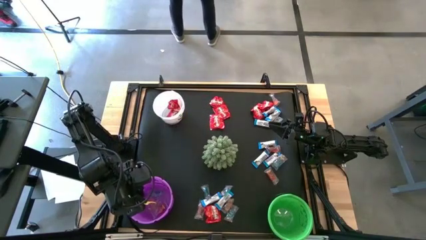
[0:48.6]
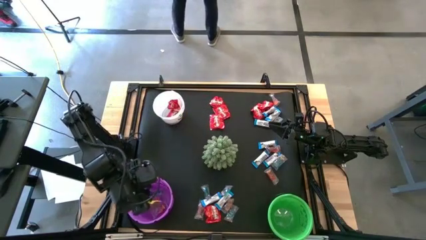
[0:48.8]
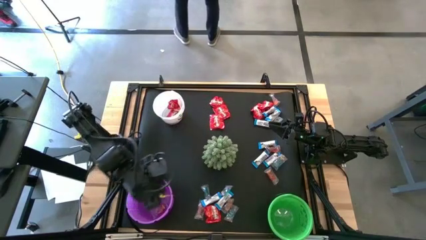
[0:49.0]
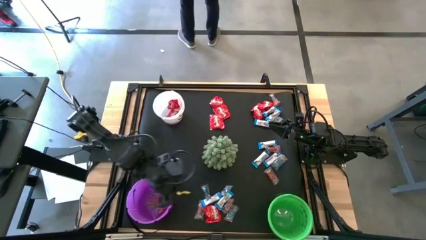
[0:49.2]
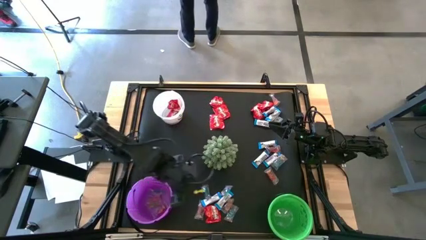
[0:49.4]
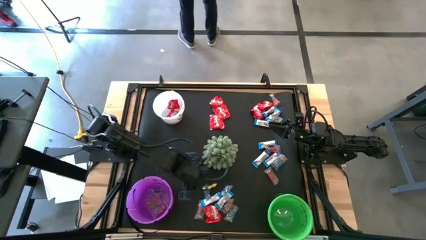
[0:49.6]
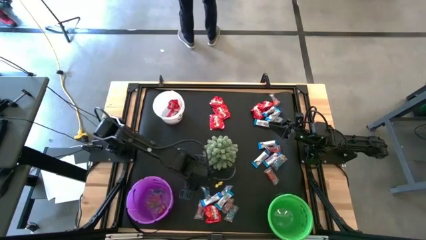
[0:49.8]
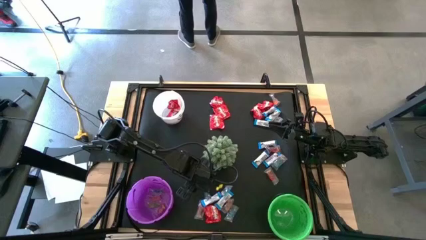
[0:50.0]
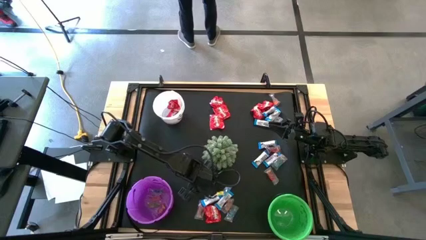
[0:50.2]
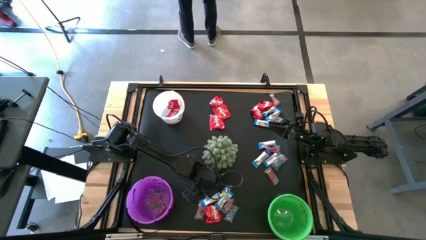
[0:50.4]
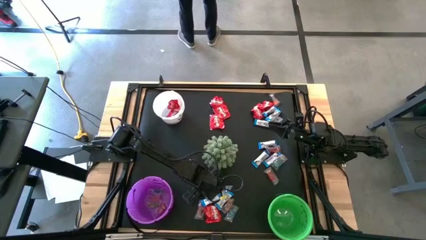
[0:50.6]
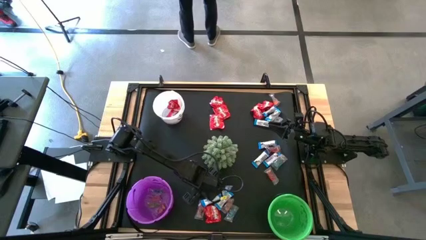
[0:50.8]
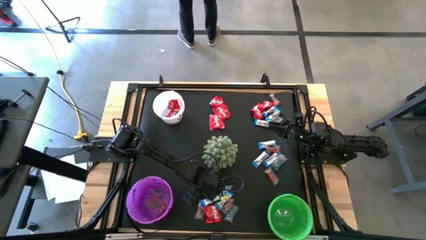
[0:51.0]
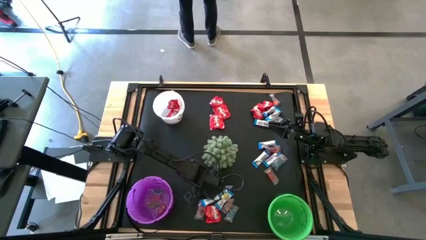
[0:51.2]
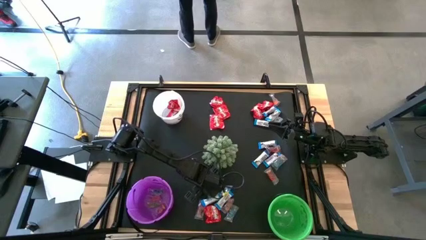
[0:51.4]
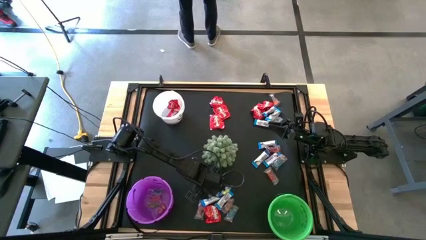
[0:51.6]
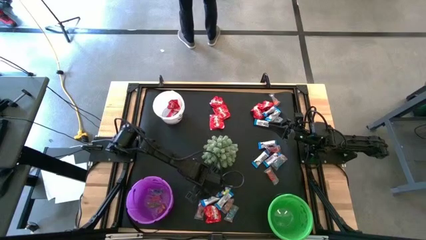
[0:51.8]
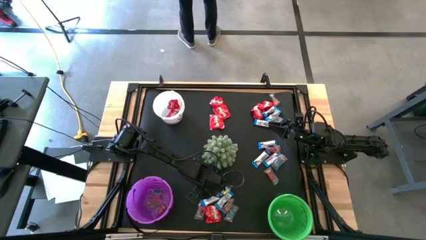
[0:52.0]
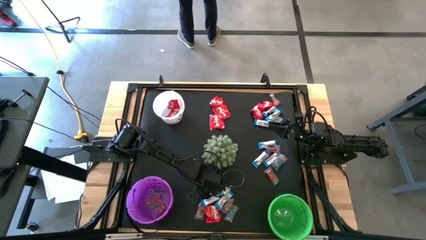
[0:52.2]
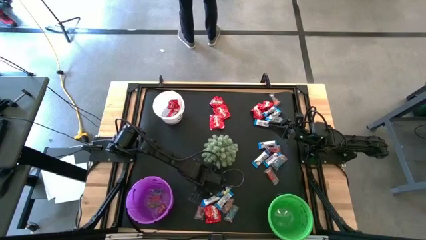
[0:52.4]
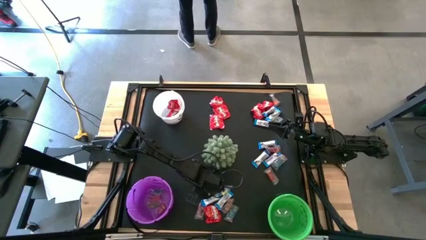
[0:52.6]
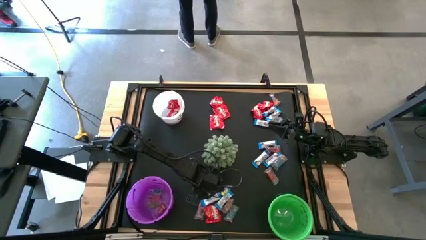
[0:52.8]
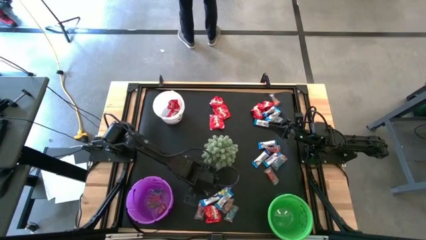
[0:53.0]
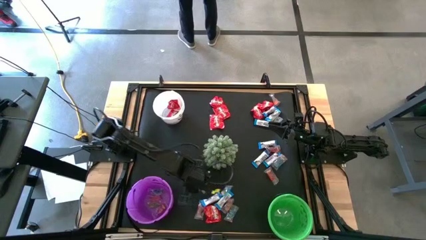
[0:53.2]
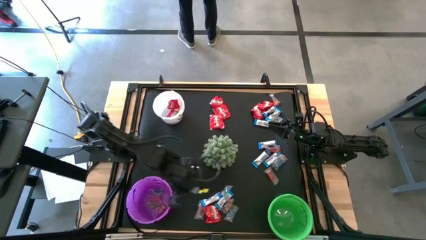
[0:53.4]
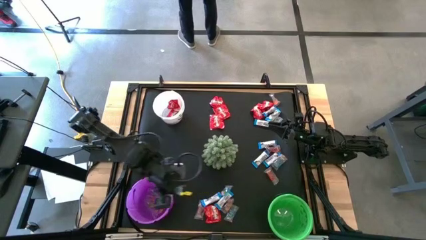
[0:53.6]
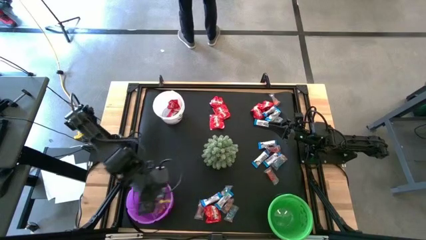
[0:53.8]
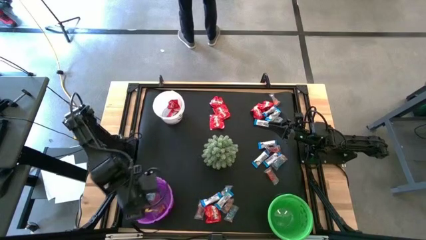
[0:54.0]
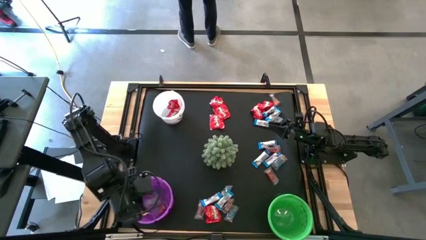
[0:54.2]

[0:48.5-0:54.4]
Task: Organize candy in baskets
Put the blue gummy into the purple bucket

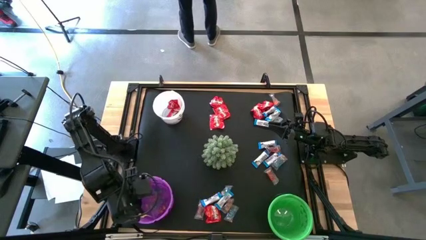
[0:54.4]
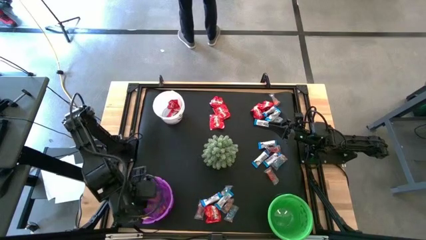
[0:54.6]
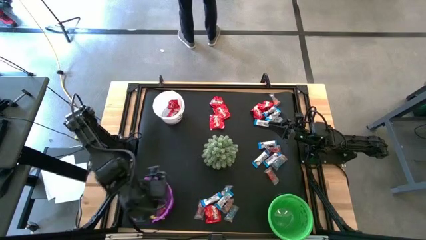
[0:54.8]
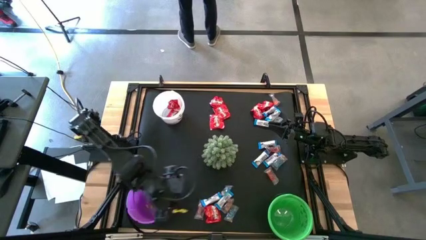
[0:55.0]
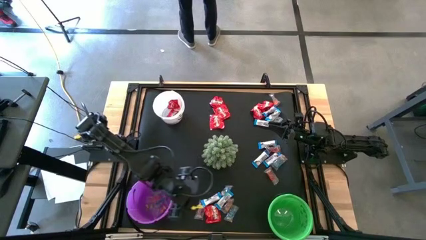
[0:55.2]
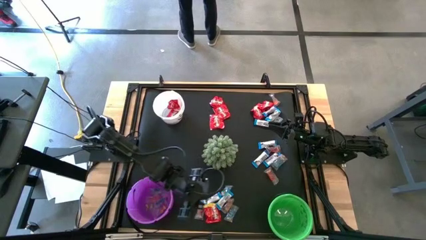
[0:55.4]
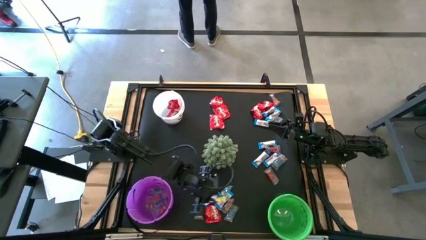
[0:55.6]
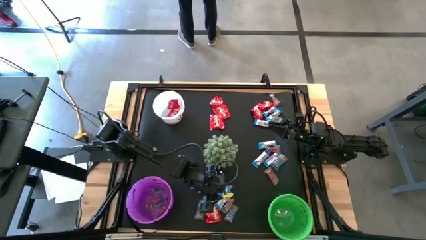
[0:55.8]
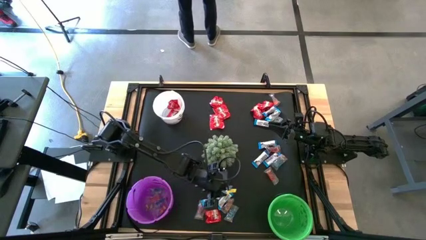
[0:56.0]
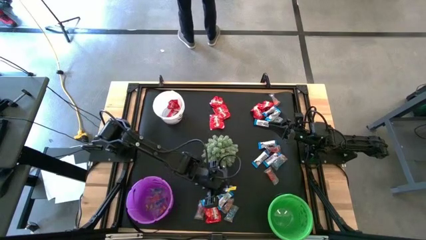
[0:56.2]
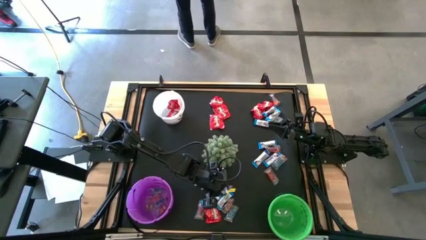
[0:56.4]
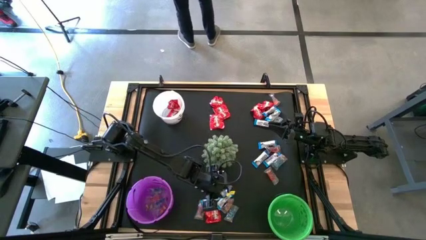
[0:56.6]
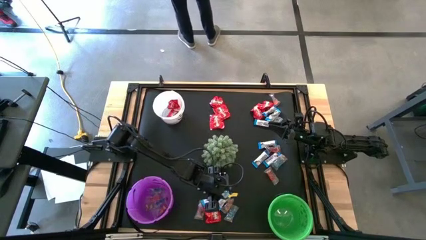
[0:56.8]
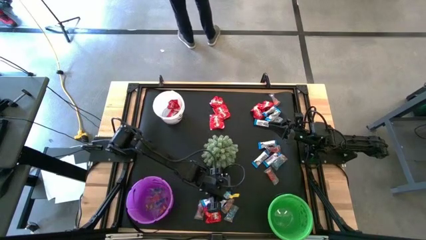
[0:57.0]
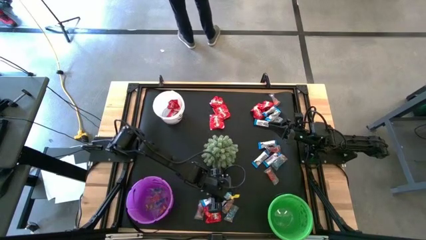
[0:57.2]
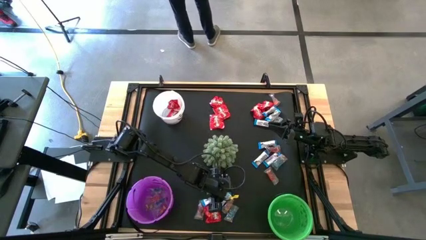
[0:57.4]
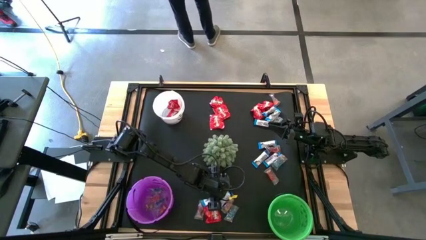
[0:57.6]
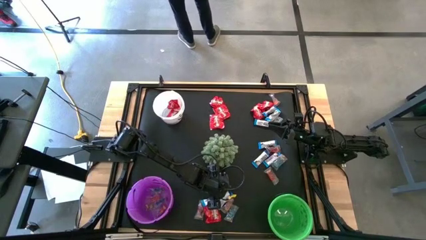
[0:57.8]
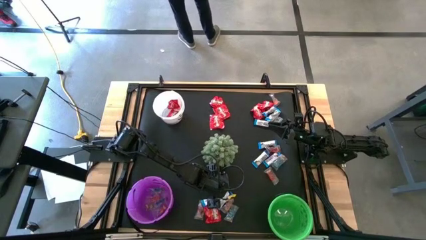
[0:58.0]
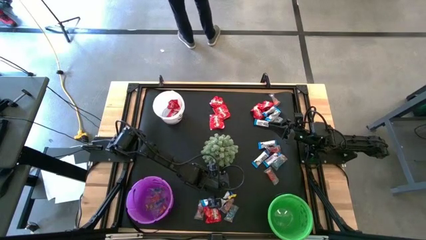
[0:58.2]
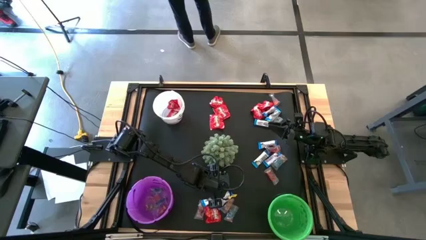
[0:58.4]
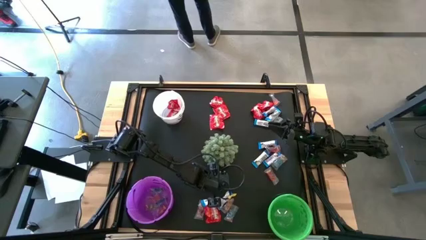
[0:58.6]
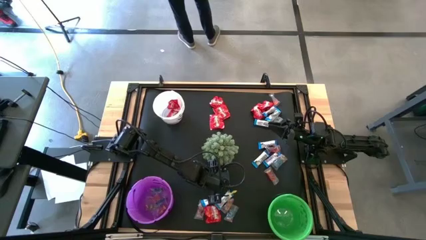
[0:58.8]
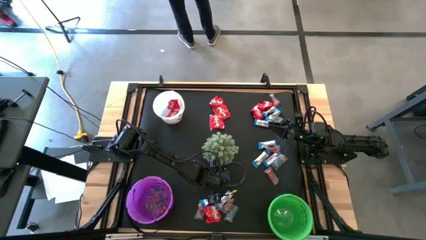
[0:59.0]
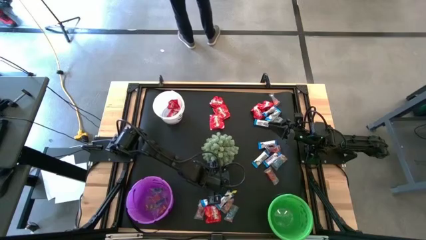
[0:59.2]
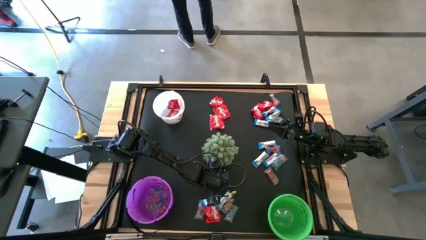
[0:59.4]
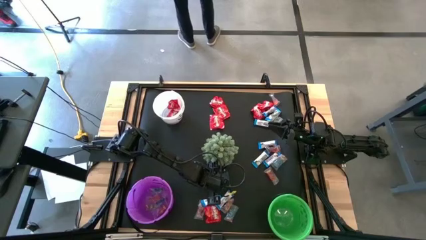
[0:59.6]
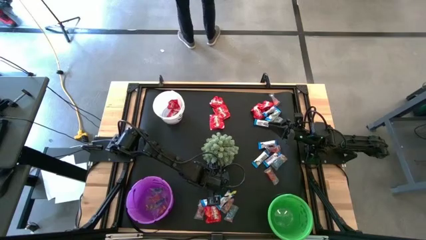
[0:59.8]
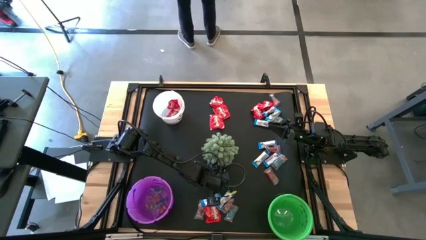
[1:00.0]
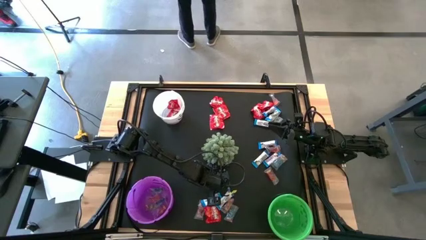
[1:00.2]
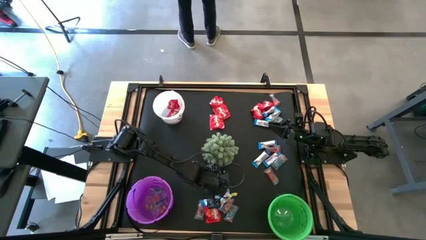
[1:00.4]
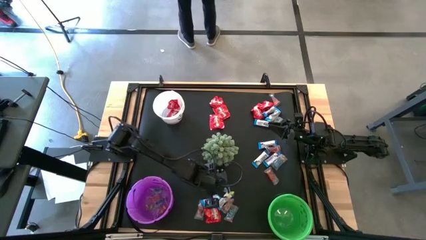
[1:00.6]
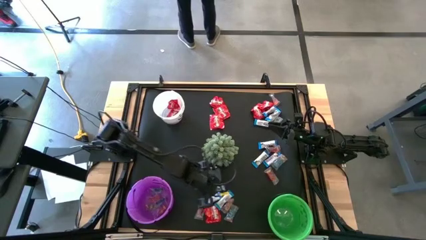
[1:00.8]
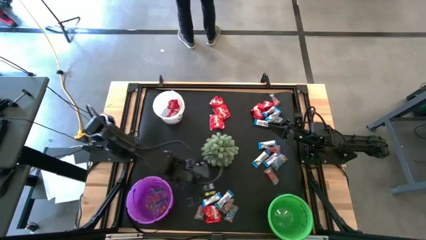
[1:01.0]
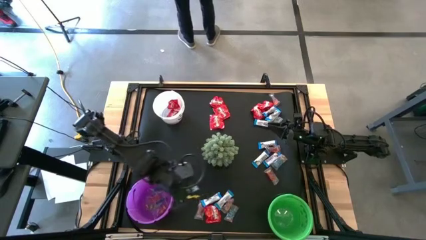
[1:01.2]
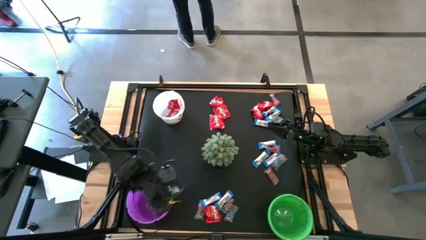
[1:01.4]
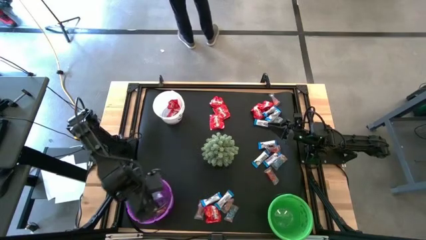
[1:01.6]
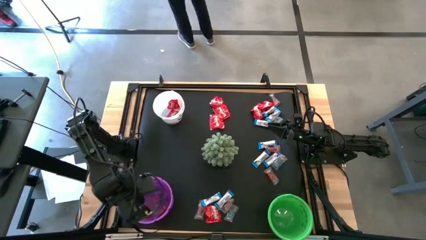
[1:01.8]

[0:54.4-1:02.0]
Put the blue gummy into the purple bucket
